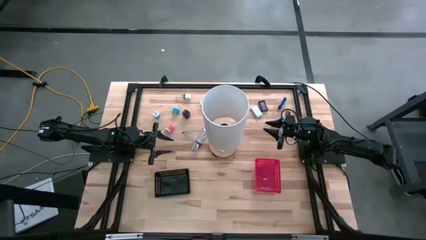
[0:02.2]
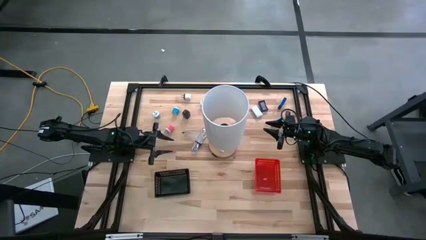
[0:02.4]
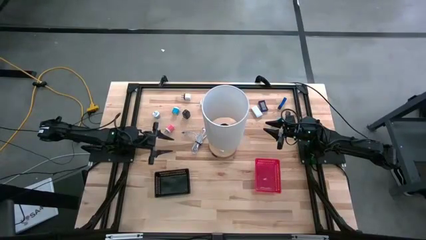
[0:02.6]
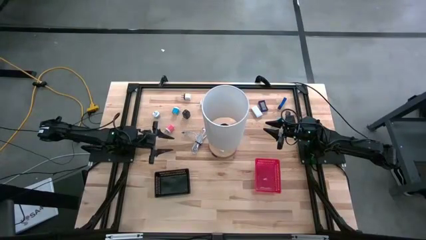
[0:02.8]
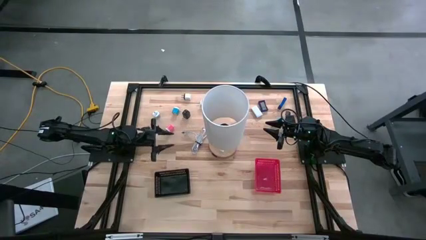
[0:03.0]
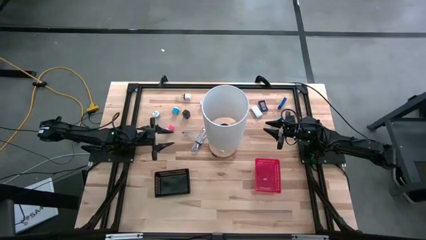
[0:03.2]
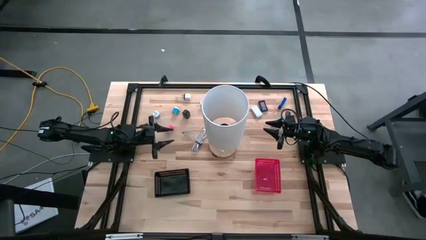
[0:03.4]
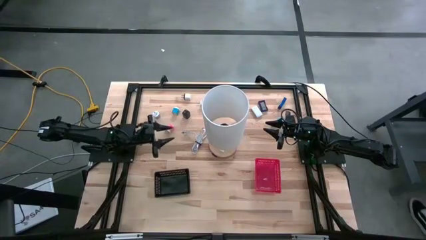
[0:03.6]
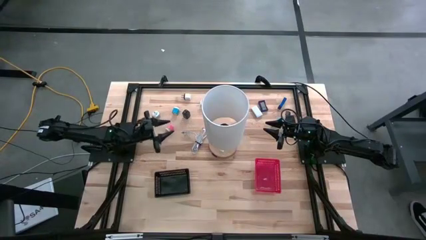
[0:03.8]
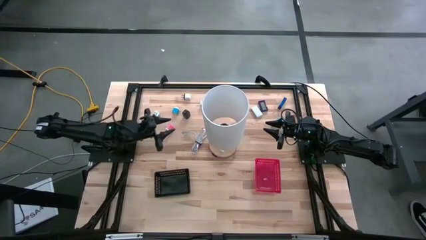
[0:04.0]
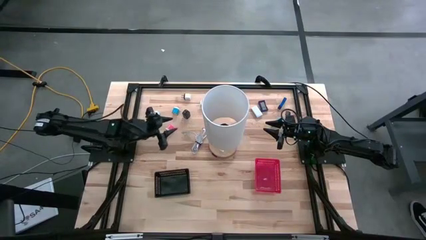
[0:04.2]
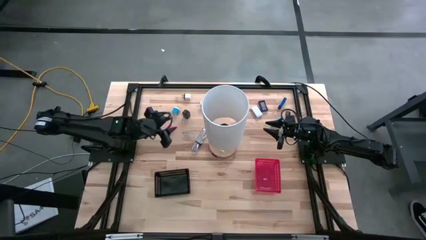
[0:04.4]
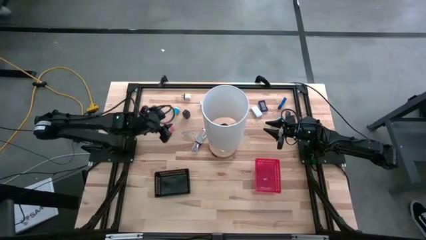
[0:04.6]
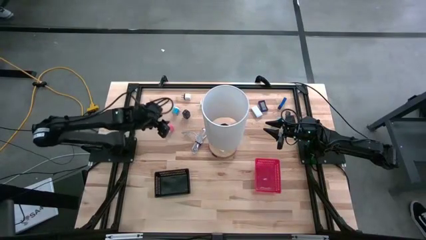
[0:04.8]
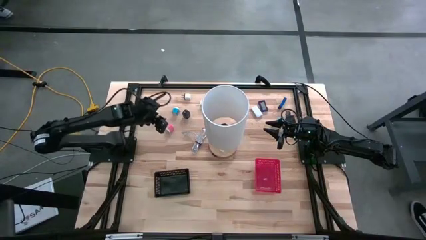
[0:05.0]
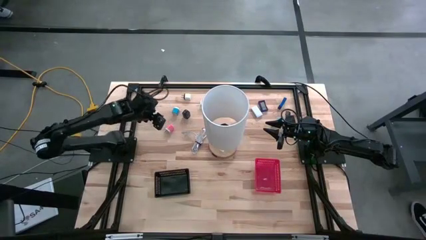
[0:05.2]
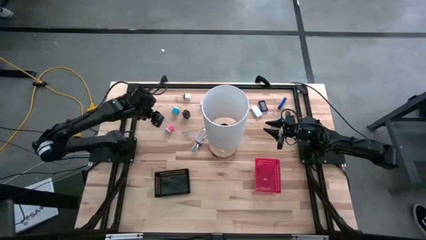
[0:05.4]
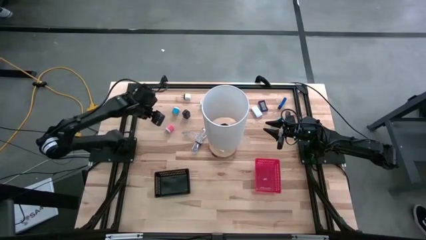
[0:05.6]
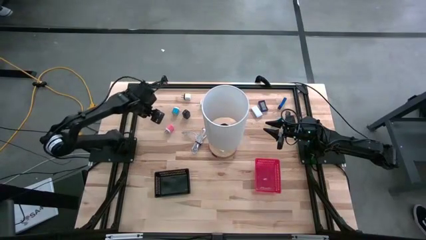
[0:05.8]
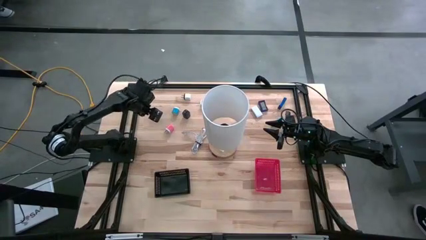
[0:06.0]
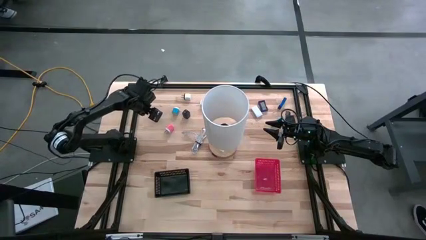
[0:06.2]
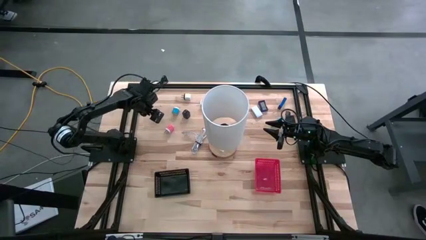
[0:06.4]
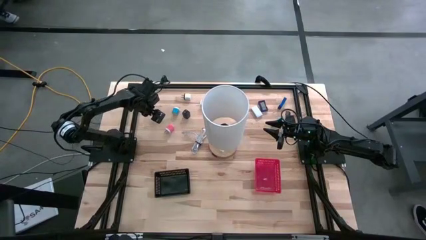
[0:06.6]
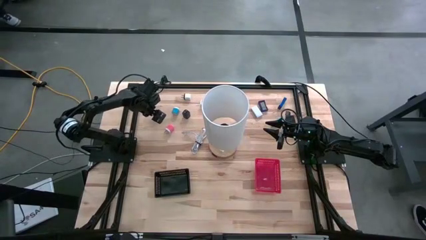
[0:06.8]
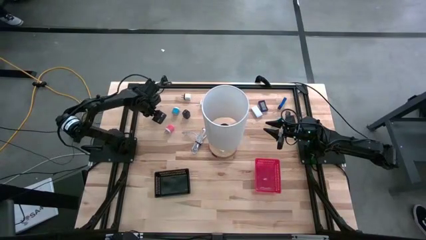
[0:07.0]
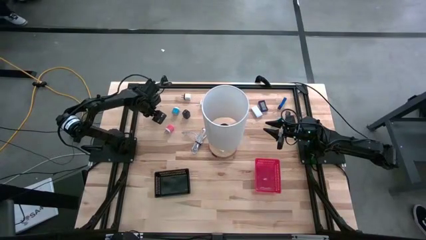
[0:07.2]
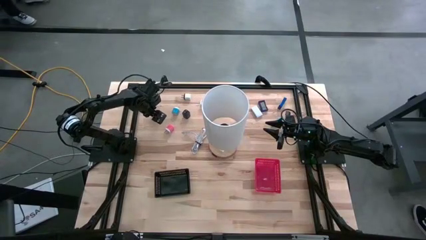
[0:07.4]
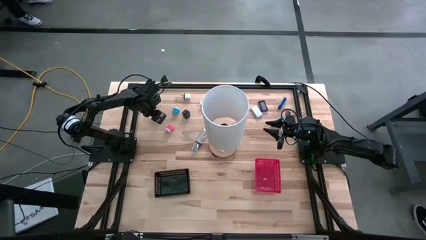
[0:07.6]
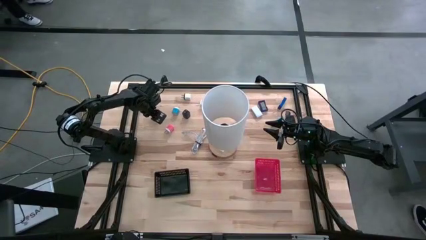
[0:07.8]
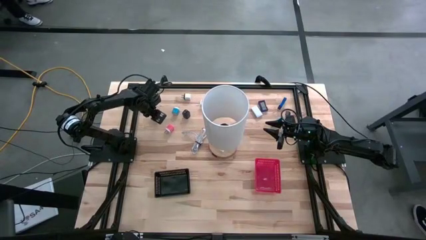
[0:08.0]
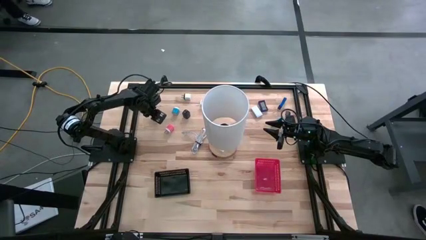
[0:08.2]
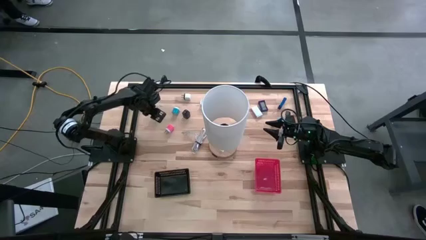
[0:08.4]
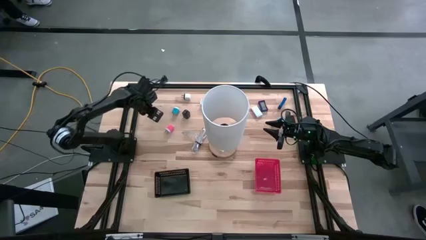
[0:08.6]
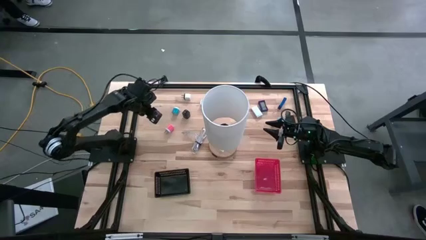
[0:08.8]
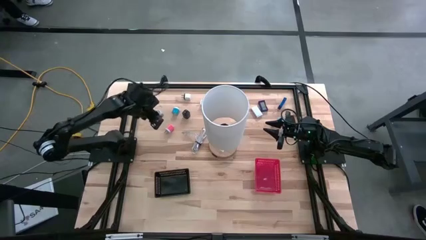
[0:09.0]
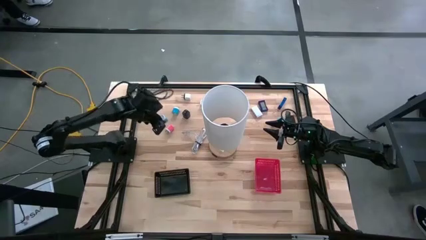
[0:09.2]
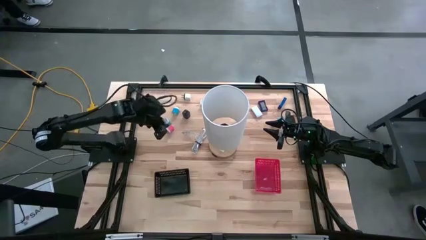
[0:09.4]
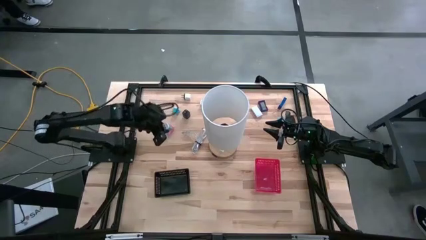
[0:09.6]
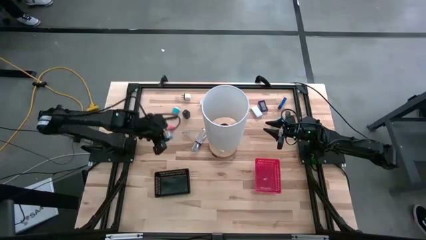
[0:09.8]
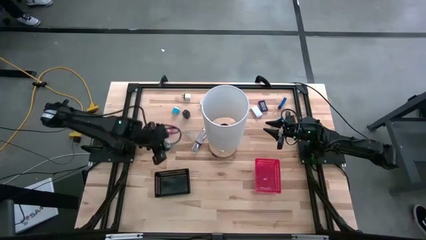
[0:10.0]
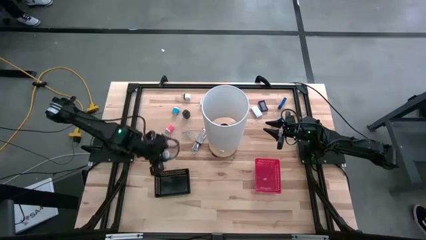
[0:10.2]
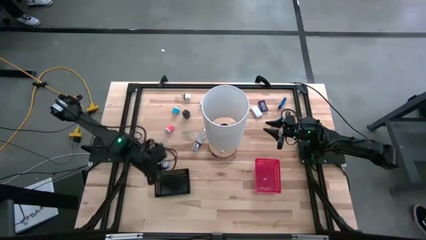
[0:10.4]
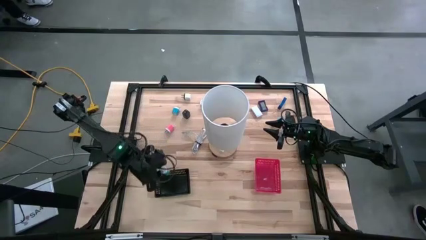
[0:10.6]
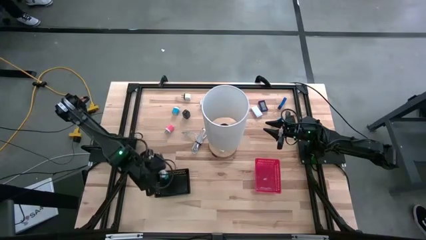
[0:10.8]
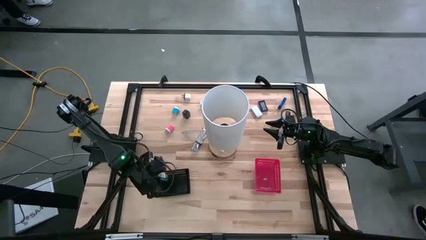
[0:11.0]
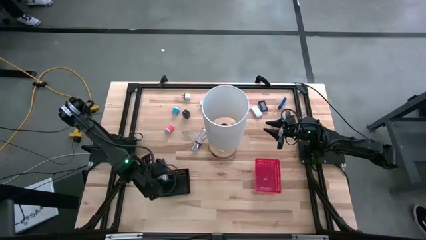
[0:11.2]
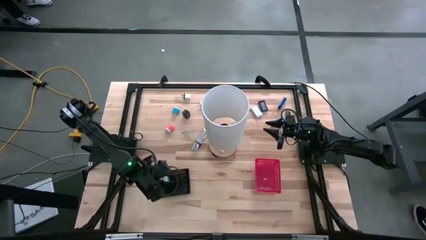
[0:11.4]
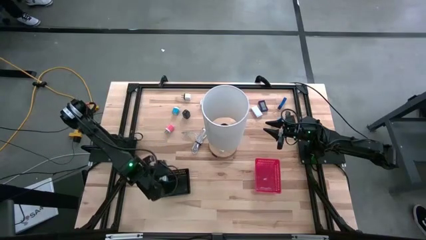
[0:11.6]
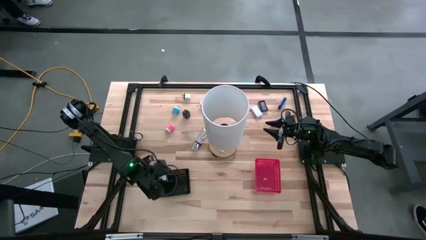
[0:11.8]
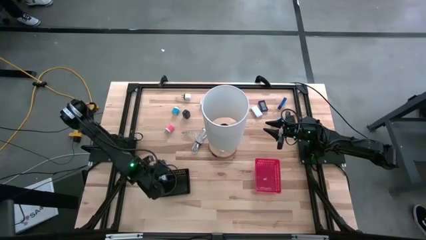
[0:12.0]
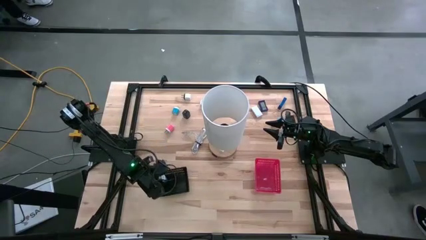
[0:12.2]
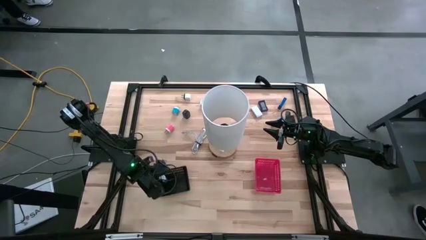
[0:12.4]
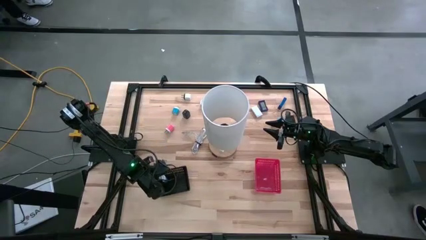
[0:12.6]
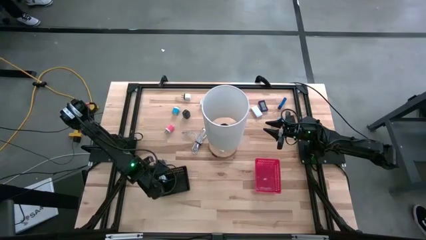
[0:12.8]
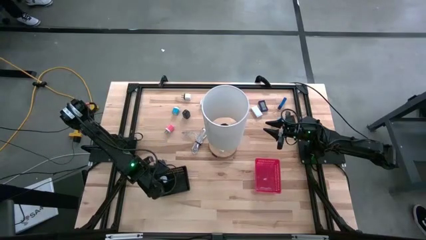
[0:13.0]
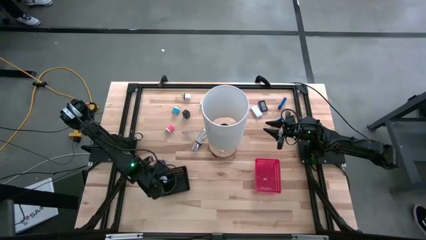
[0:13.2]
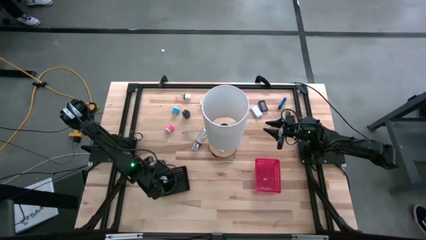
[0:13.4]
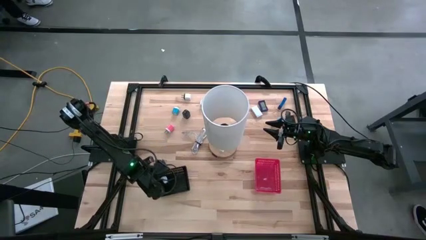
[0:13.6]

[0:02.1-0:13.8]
Task: Pick & Place Office items
Put the left blue charger adapter into the black bin

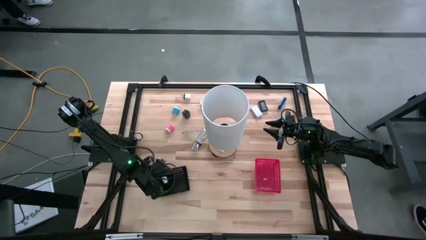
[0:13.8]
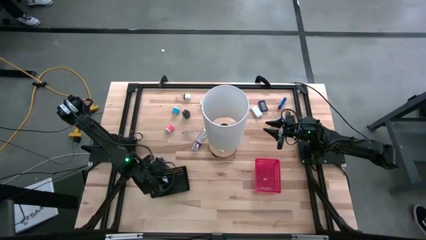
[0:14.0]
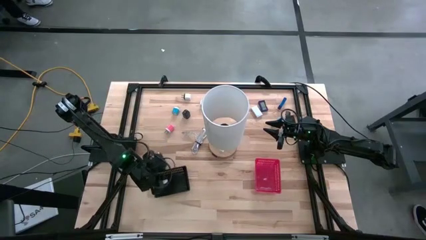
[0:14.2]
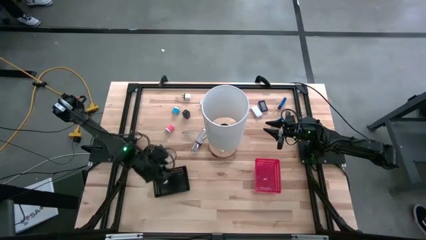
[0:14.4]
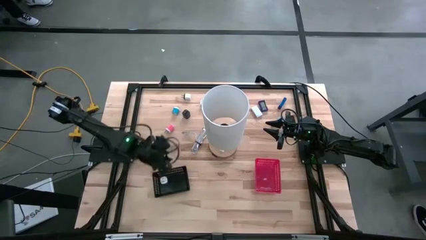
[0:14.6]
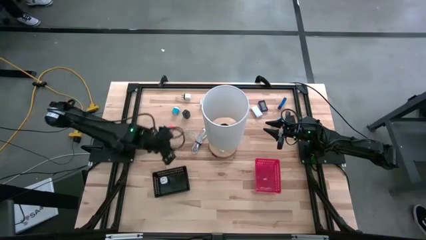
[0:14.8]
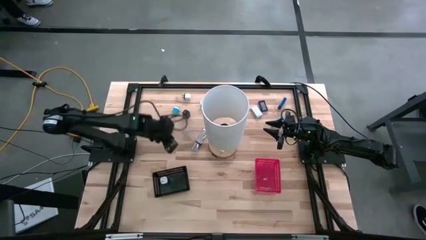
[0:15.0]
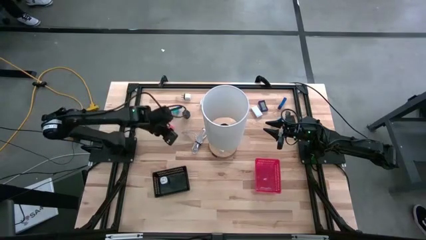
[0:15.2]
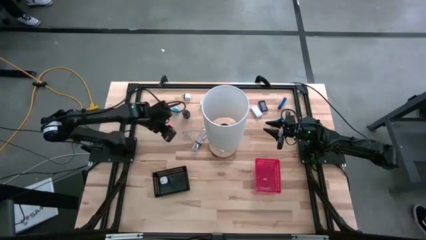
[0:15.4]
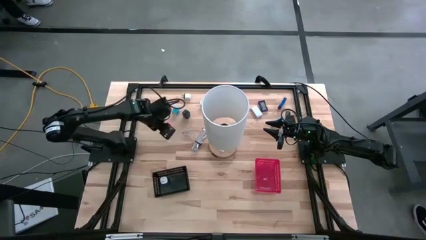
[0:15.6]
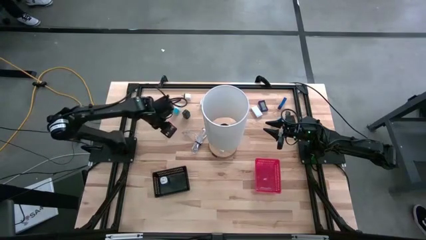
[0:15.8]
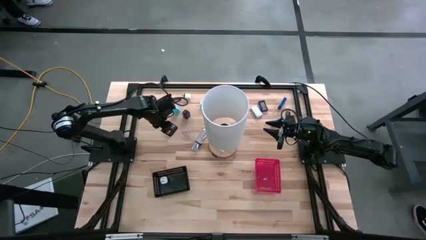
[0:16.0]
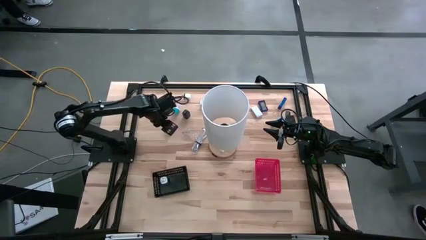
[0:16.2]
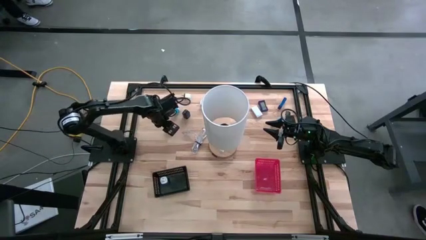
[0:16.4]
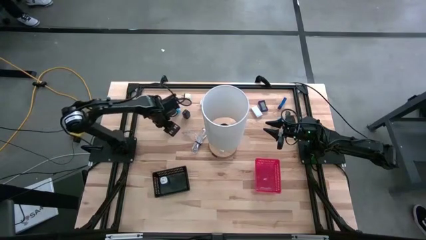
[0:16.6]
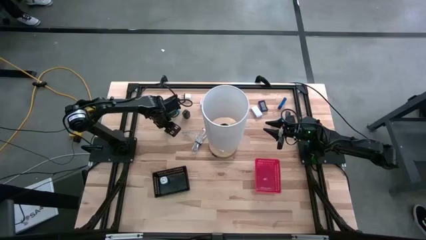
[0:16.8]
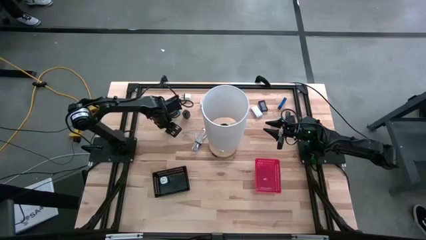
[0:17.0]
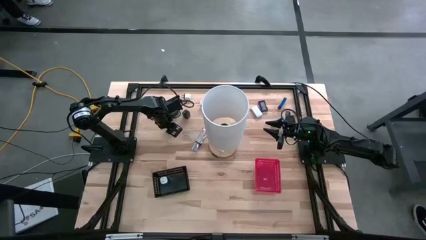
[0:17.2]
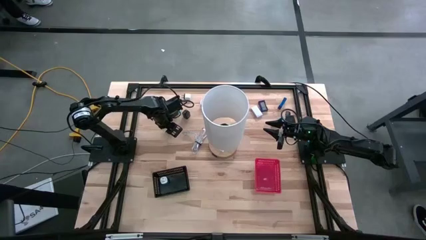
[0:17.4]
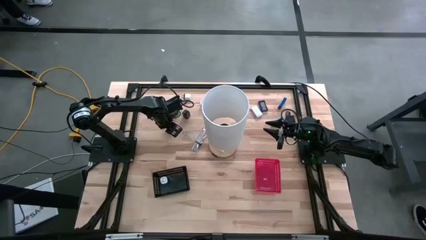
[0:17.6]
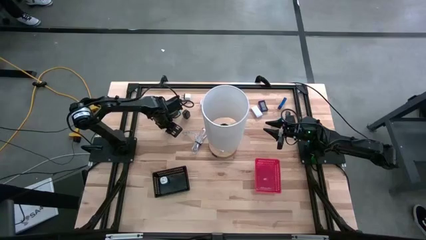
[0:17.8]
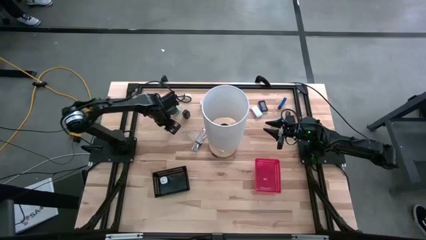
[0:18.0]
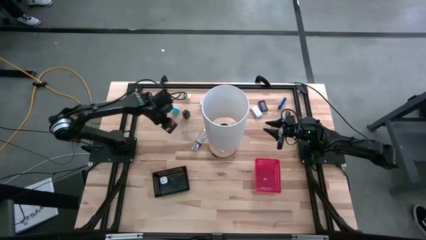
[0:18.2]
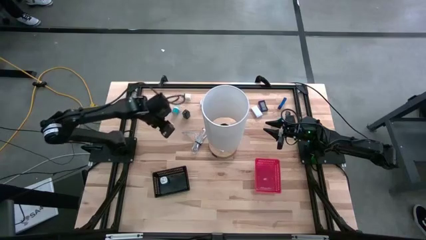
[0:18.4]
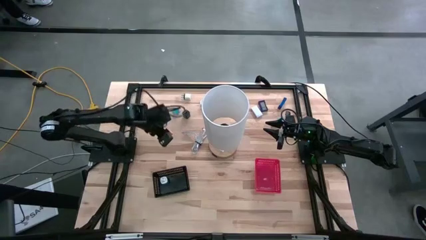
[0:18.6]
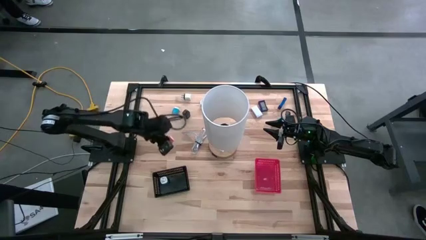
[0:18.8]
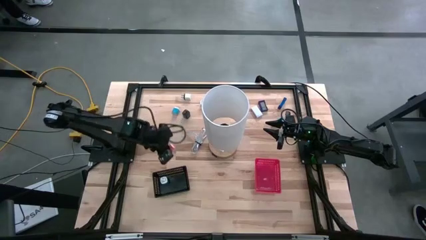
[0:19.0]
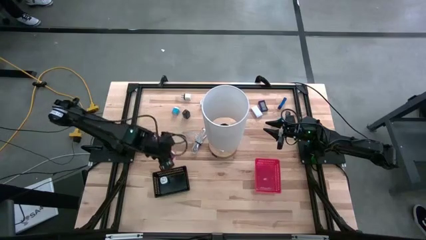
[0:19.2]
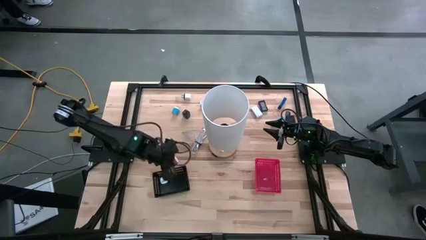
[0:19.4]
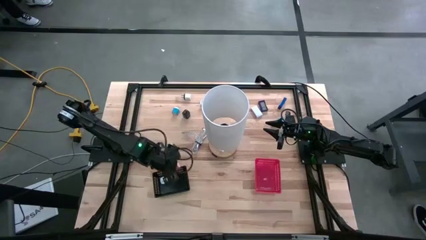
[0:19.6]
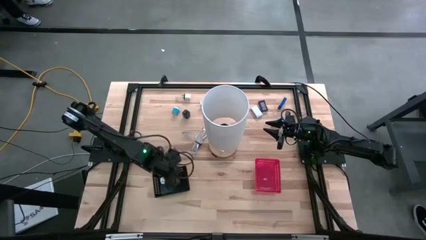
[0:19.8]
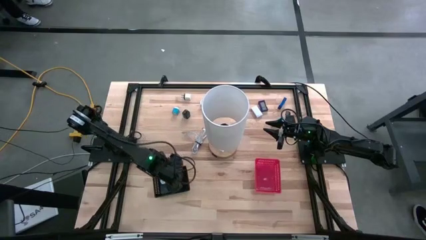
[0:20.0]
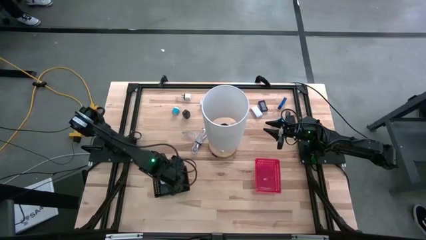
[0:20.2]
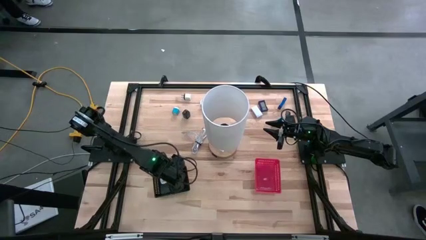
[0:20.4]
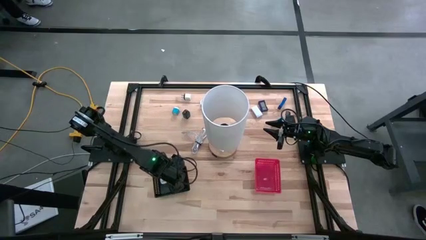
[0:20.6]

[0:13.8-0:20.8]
Put the pink charger adapter into the black bin
